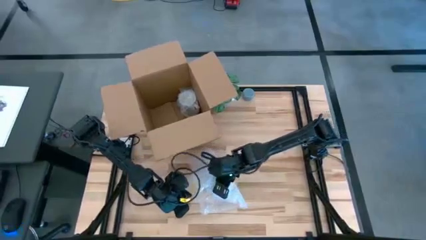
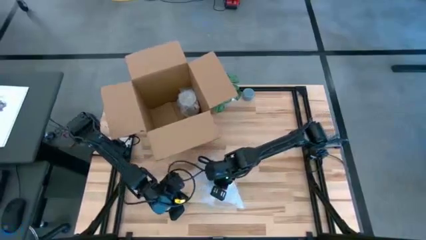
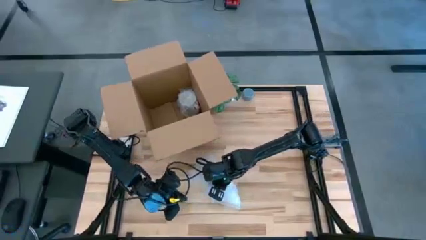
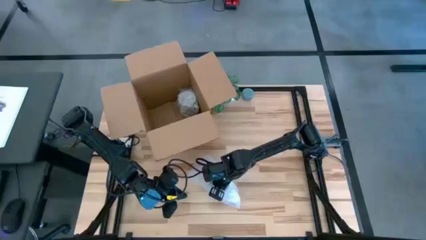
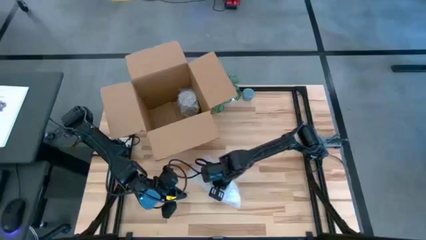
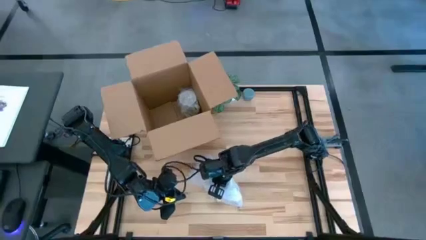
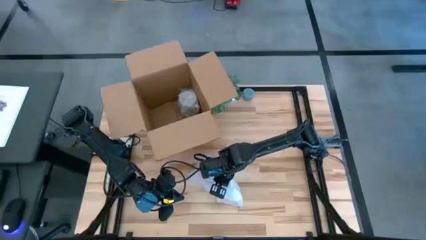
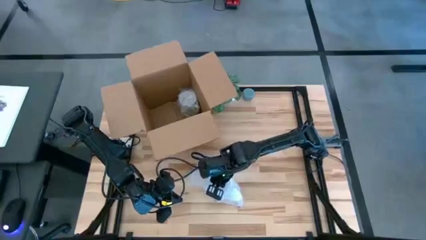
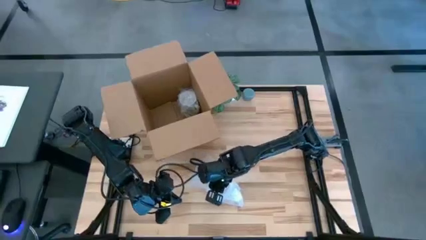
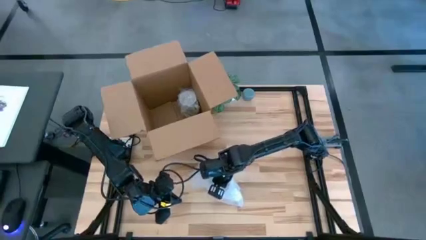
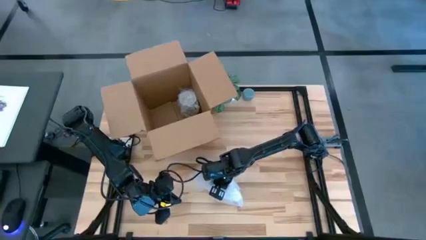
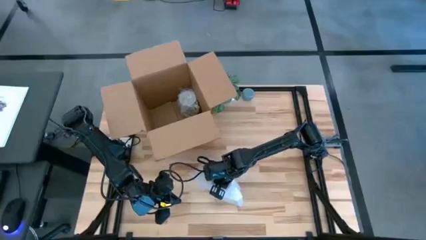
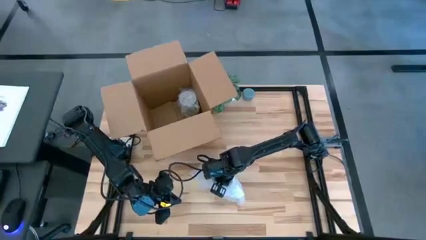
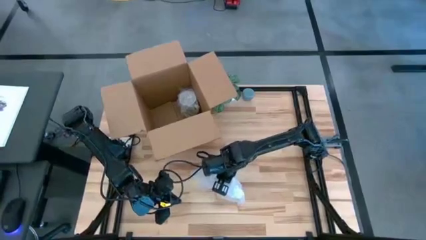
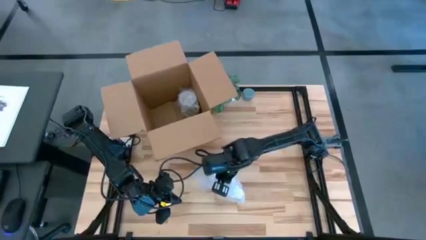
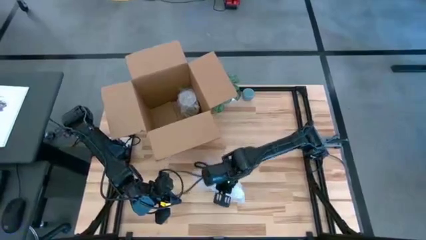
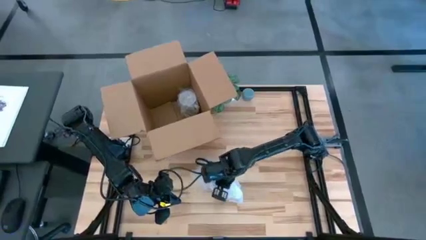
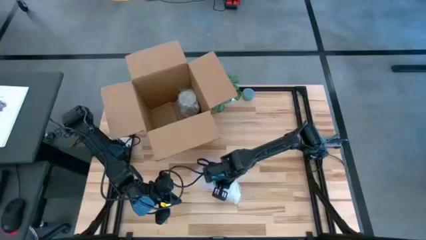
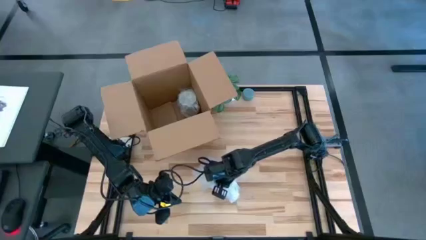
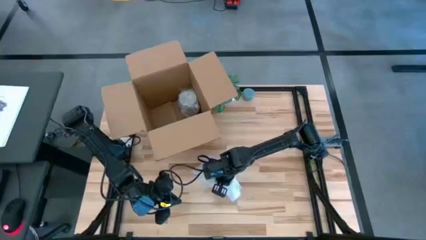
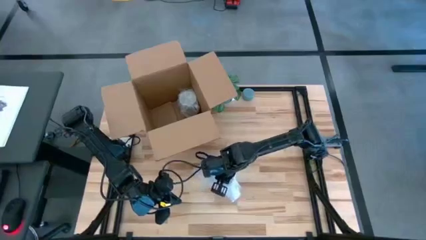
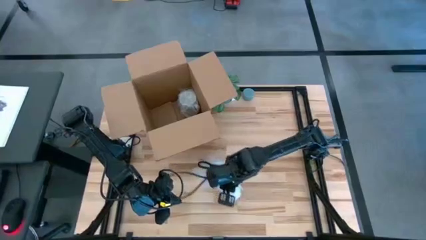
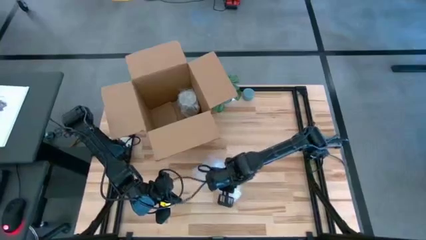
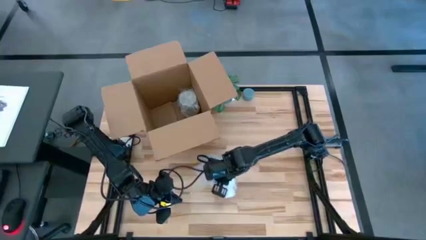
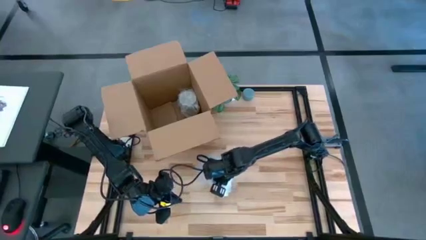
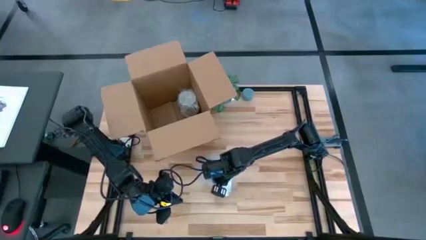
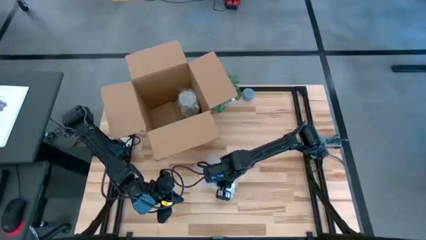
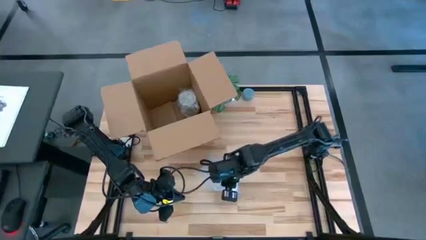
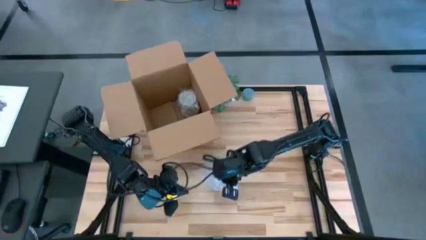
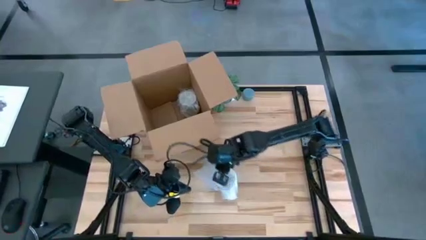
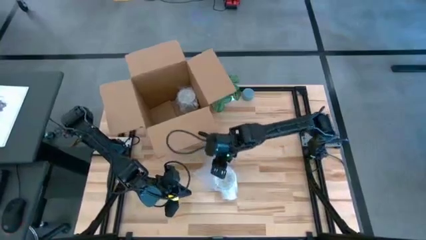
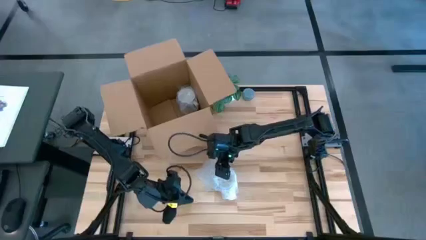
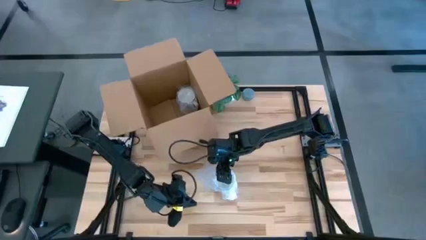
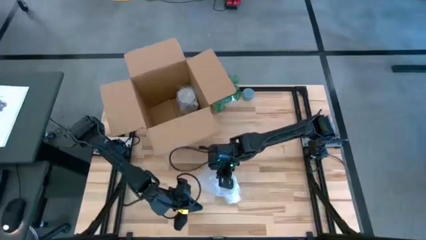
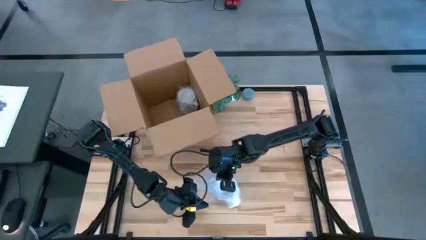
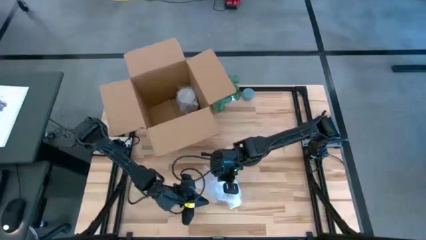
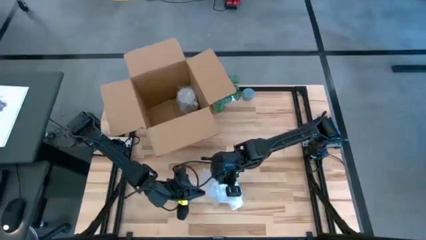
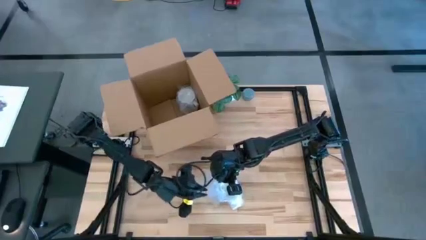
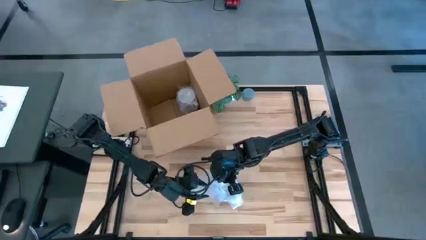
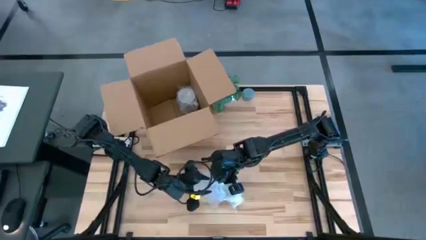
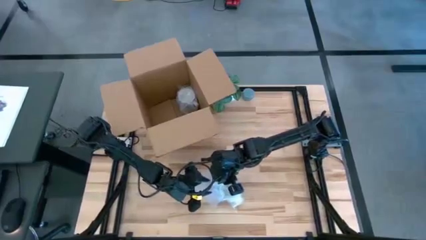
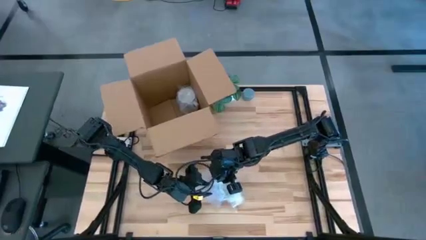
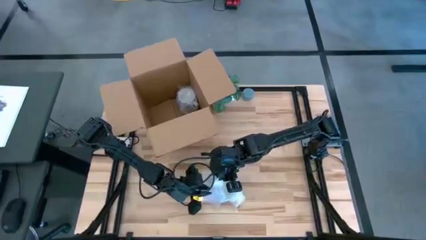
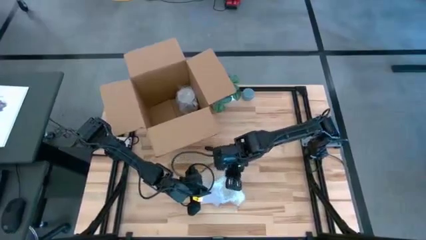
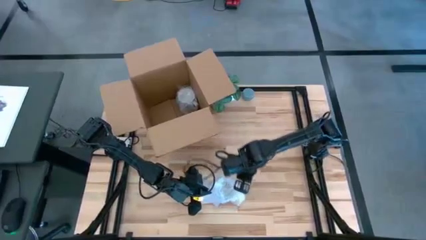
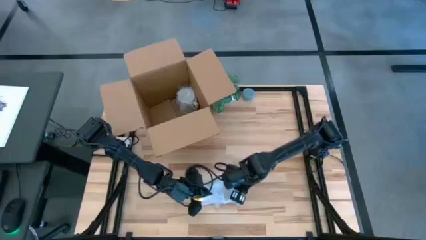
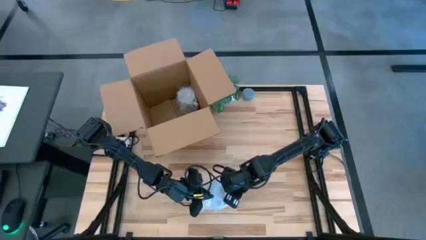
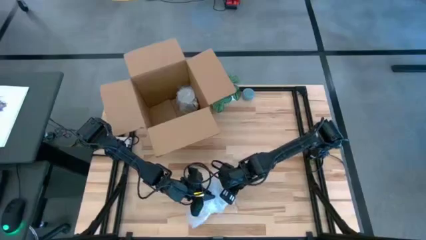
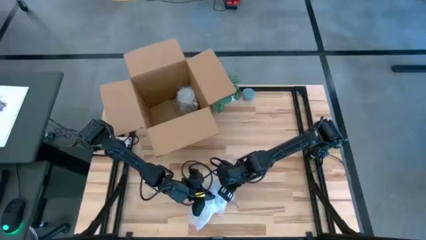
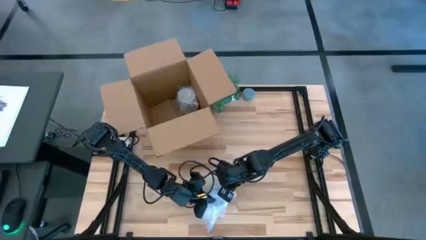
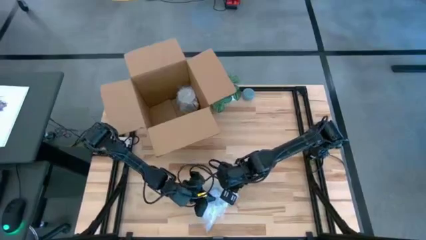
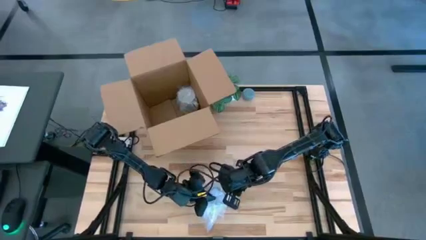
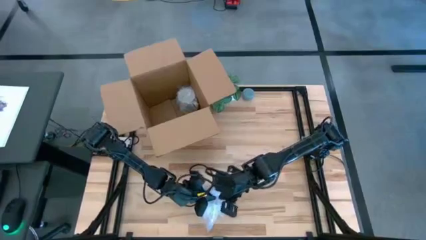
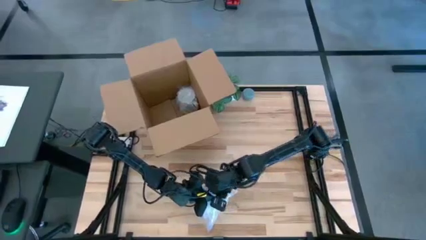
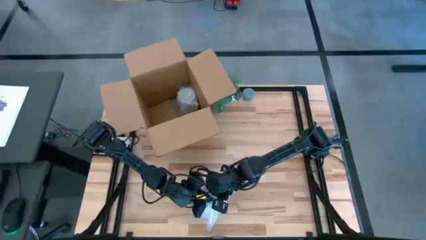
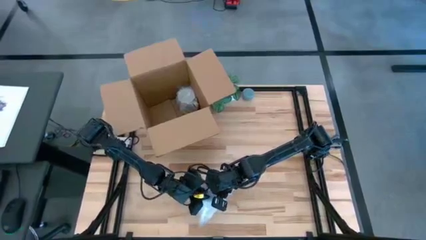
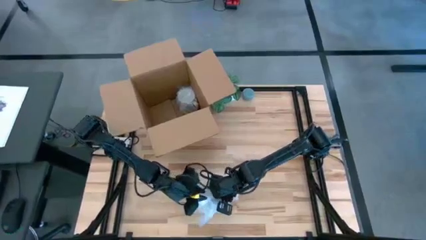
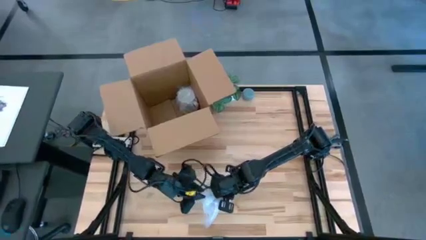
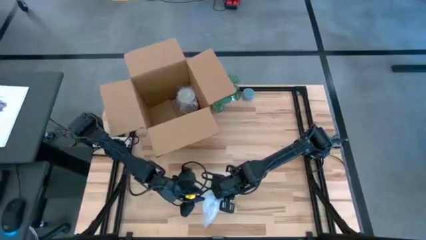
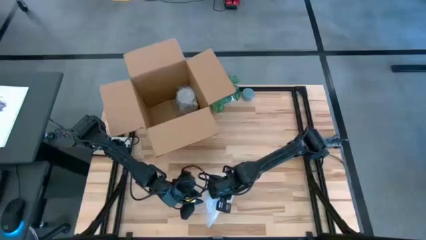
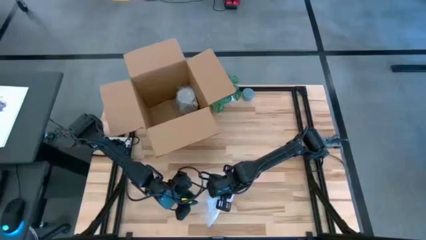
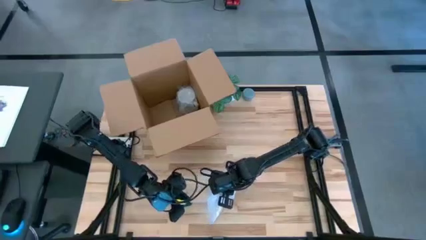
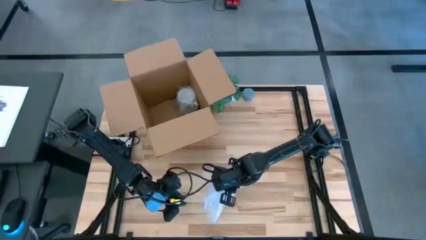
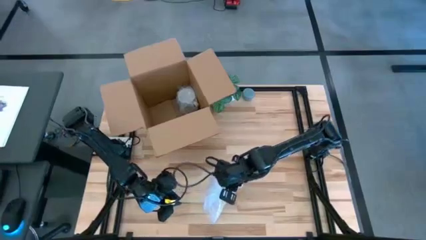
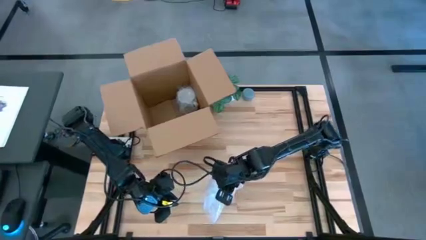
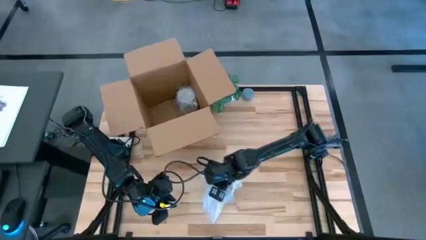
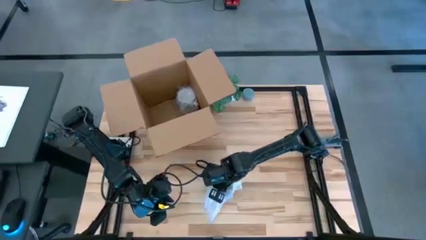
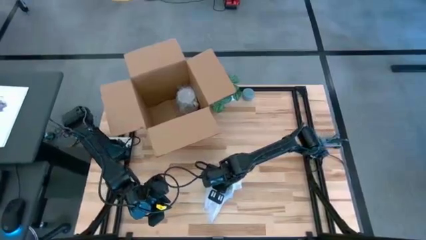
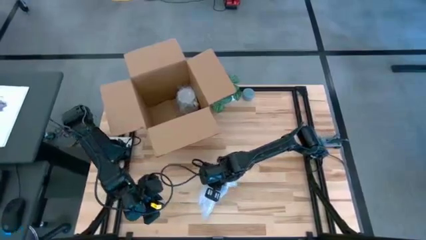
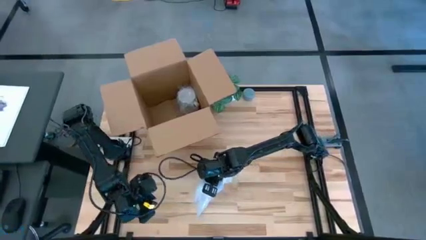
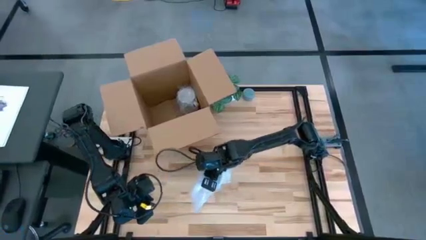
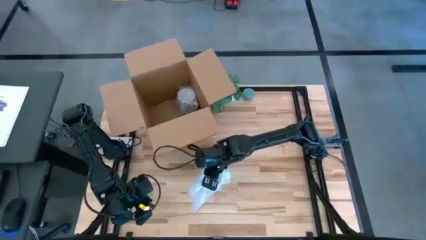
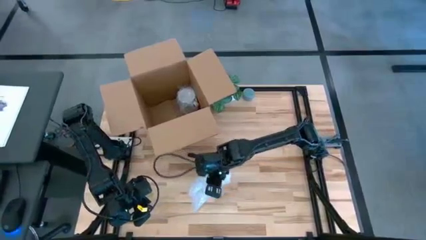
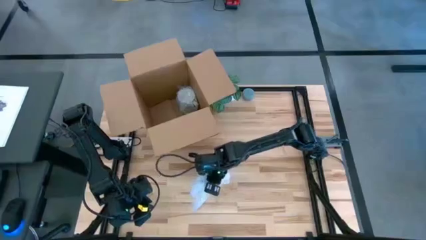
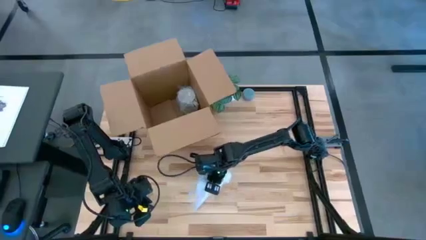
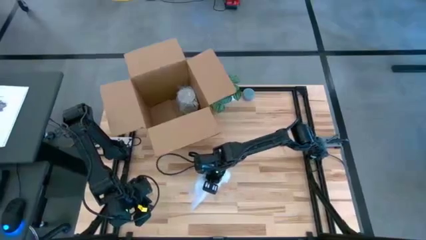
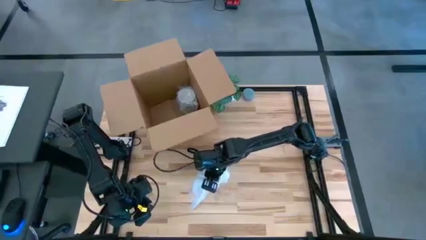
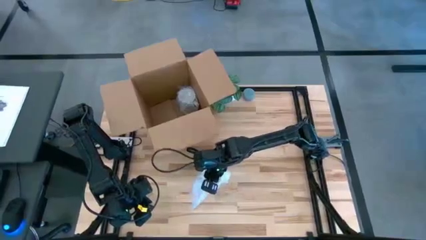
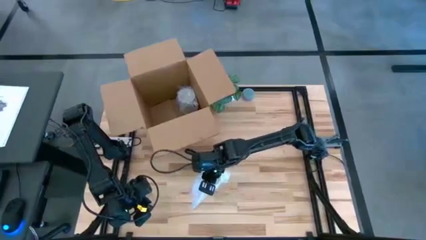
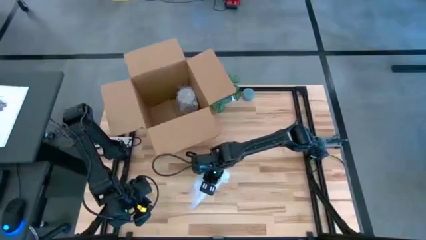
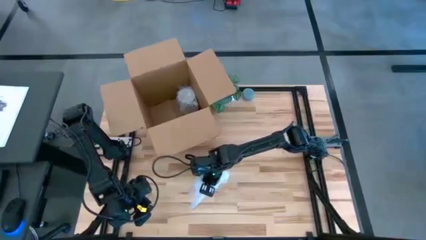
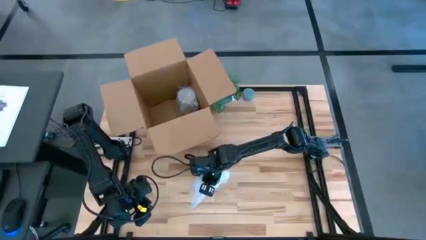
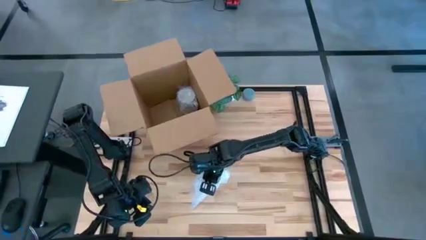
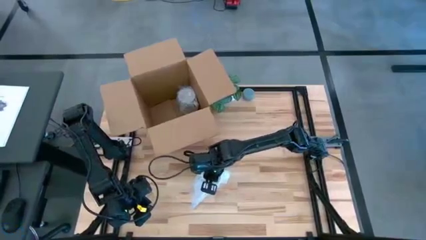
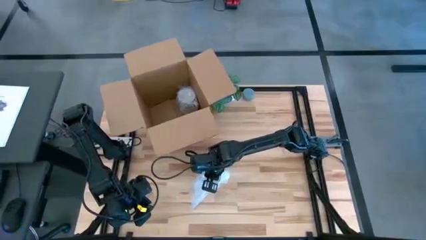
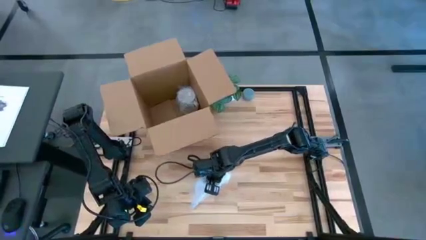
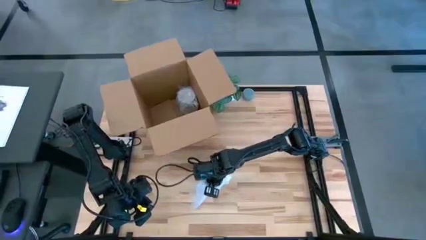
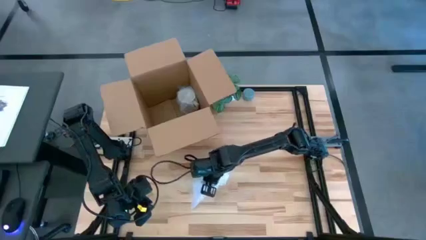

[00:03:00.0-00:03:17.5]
Task: wrap mug
Wrap the blue mug with the bubble wrap
